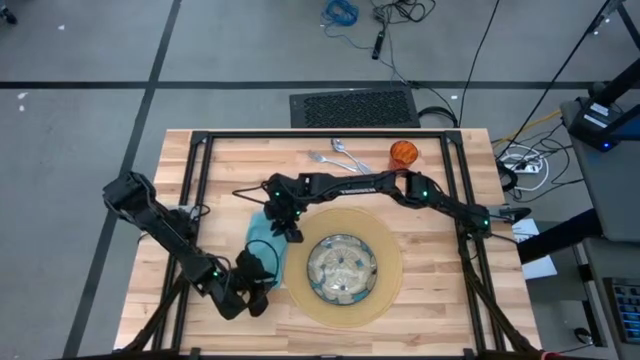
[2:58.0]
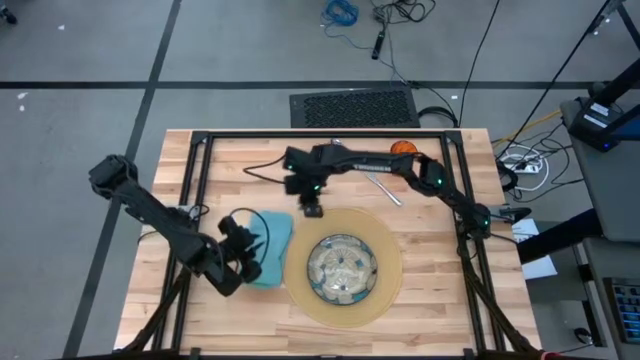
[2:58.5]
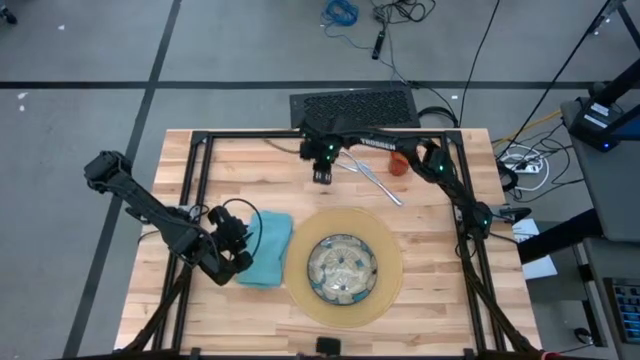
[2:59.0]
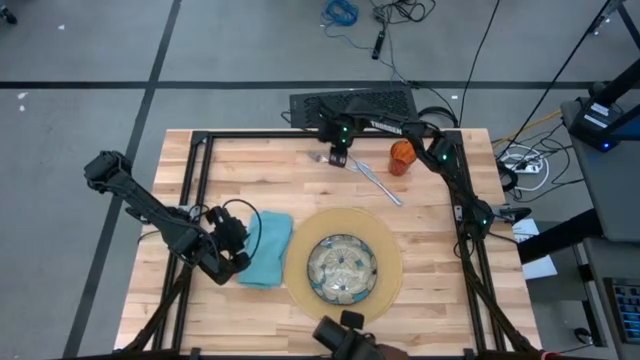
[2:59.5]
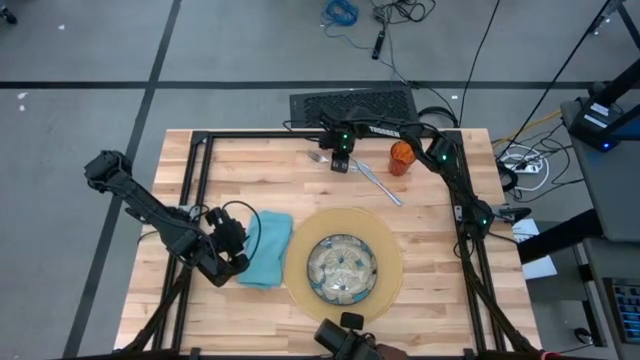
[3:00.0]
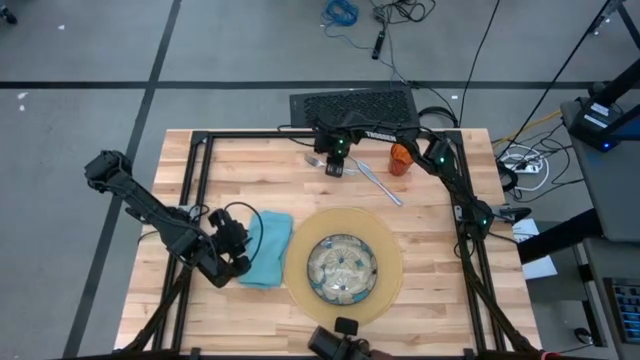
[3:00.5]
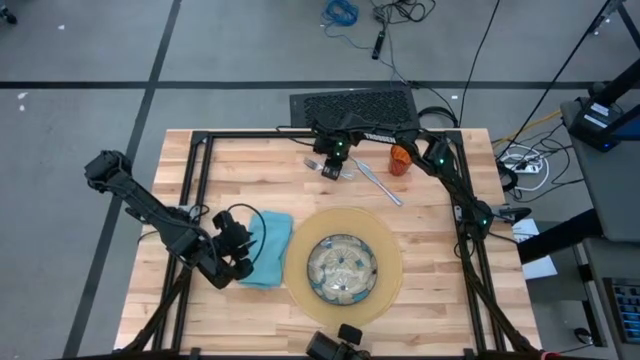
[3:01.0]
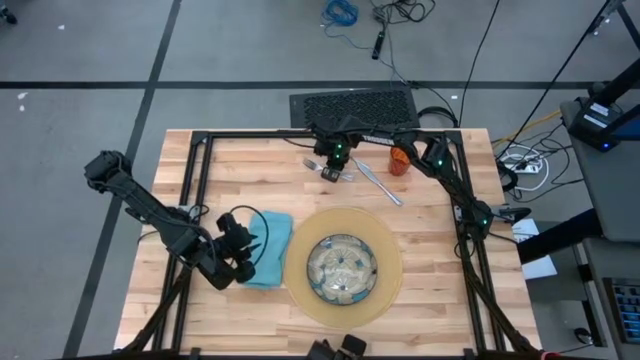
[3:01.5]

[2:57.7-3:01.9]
Task: Set table place
Put the silver fork on the blue napkin

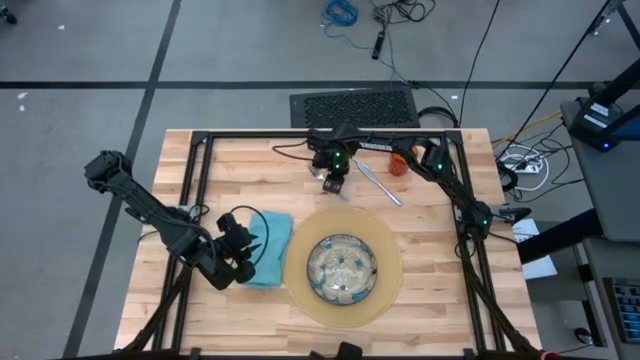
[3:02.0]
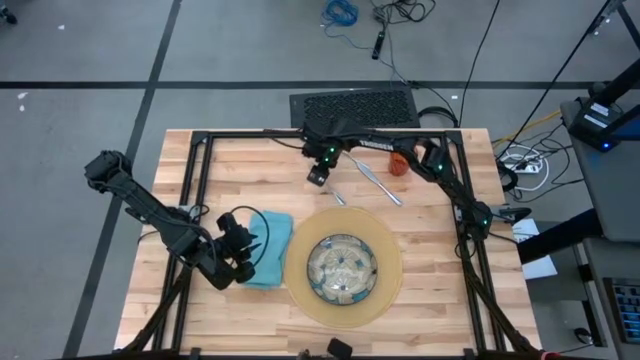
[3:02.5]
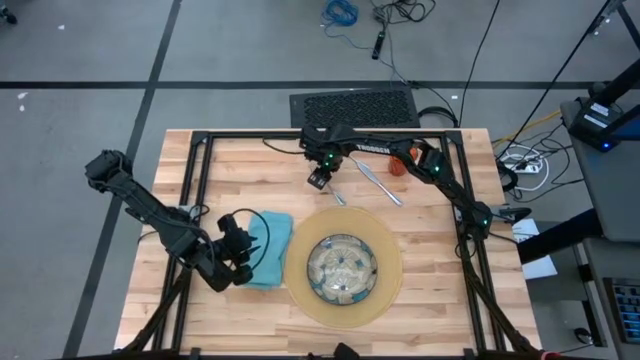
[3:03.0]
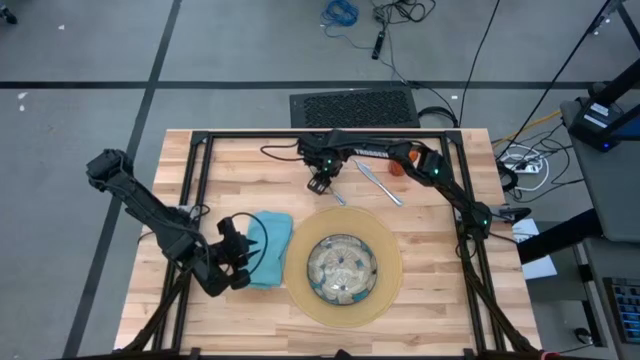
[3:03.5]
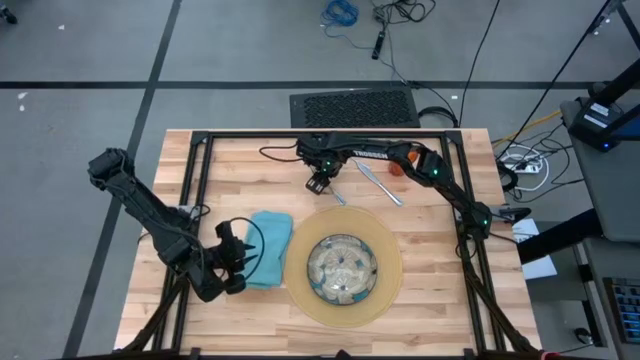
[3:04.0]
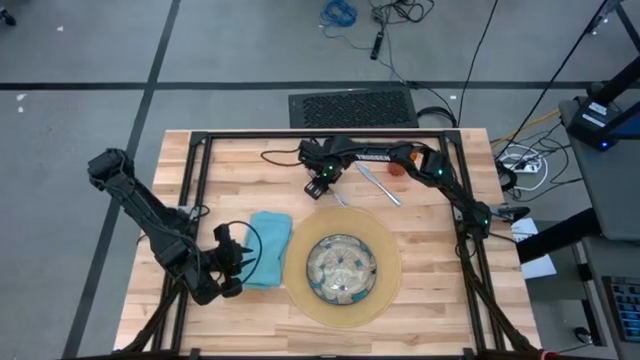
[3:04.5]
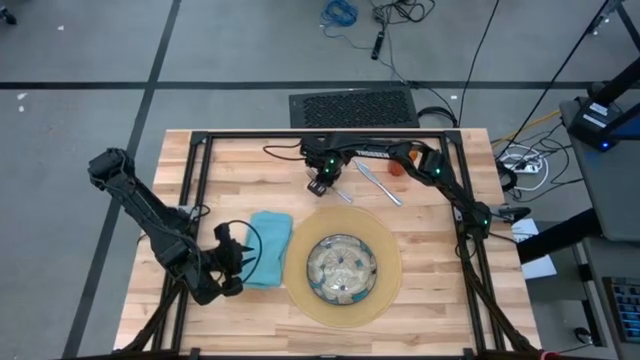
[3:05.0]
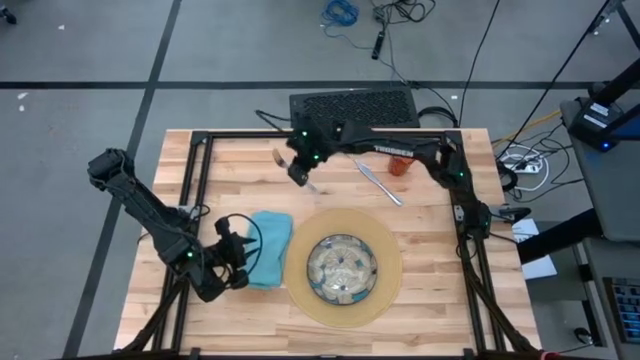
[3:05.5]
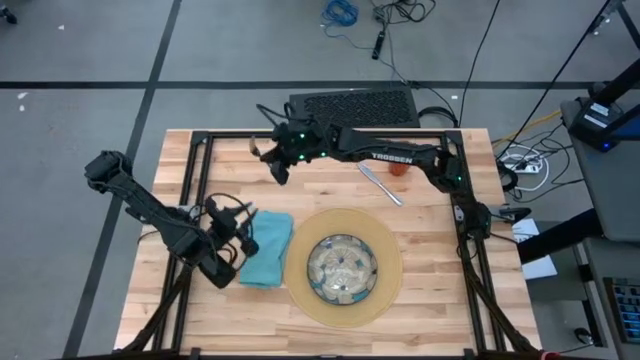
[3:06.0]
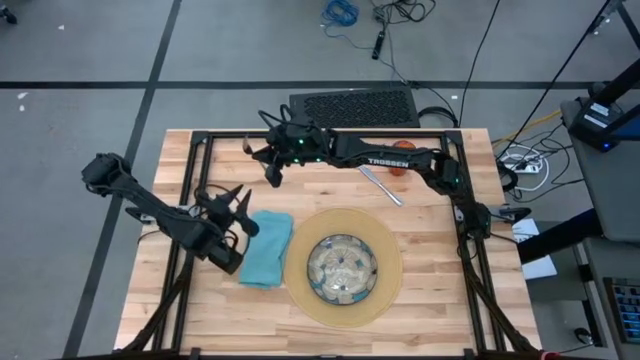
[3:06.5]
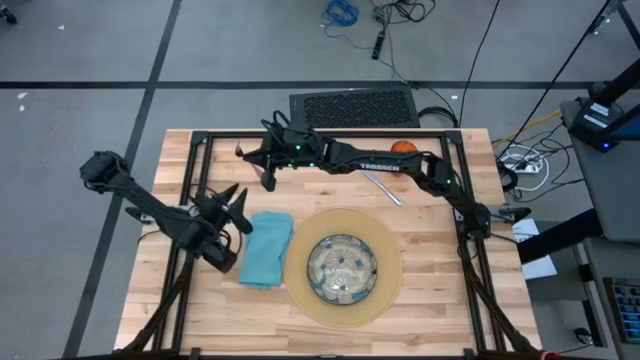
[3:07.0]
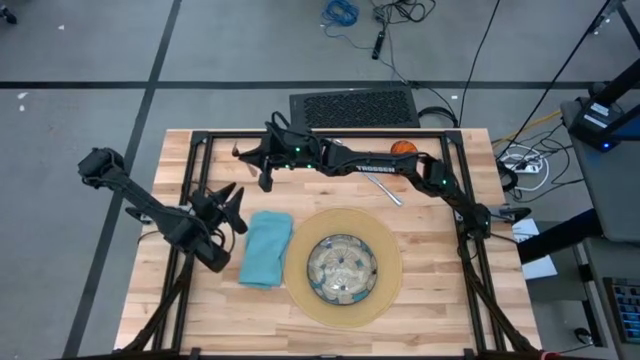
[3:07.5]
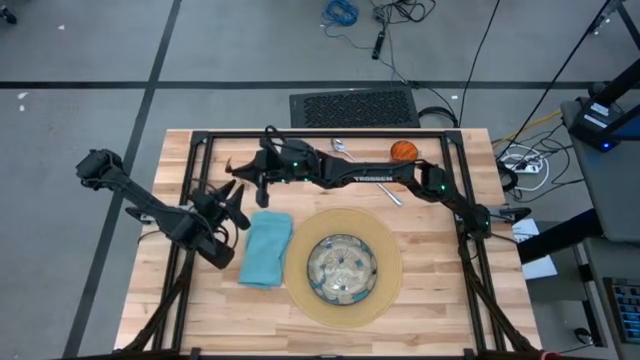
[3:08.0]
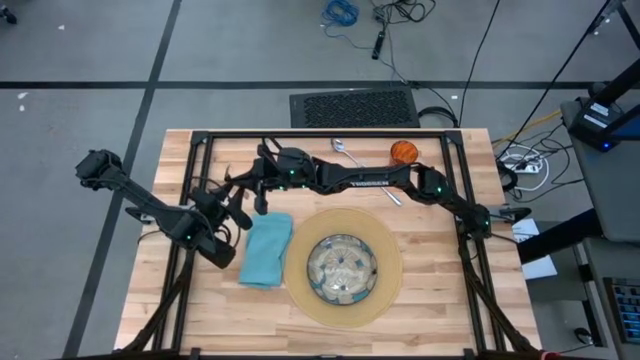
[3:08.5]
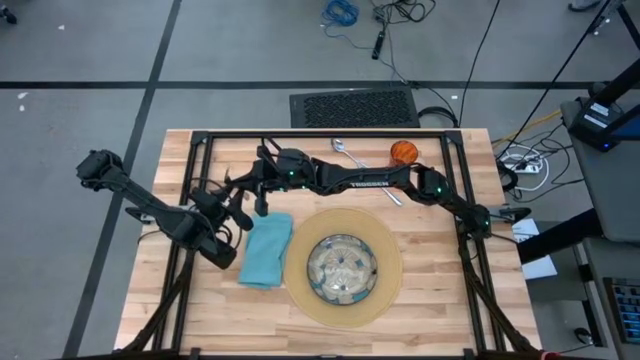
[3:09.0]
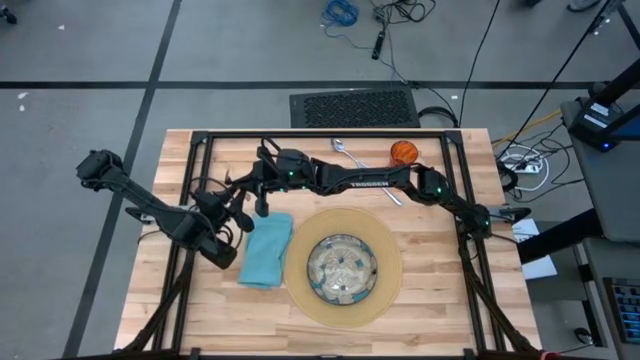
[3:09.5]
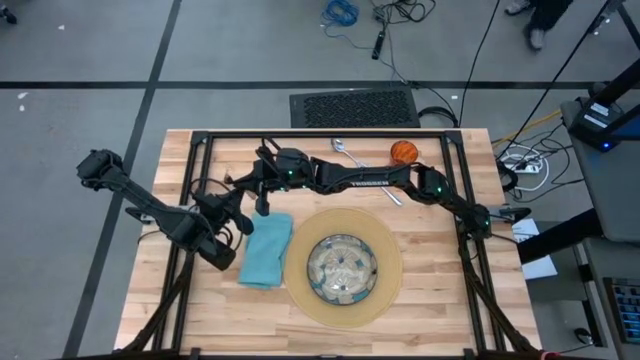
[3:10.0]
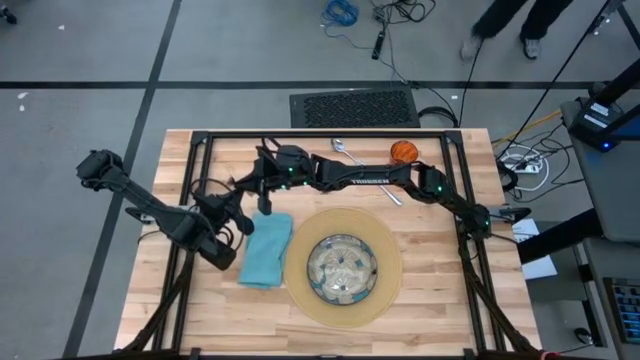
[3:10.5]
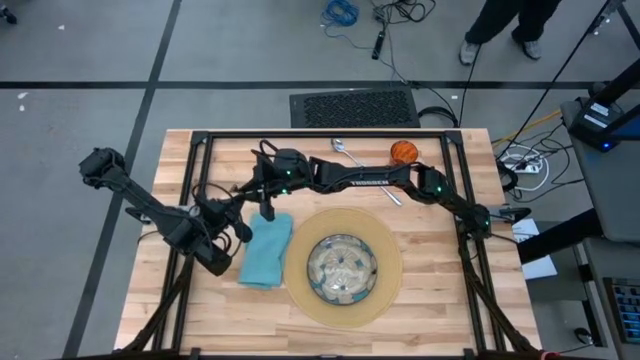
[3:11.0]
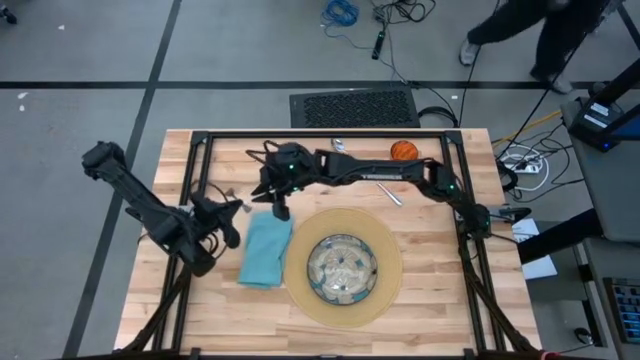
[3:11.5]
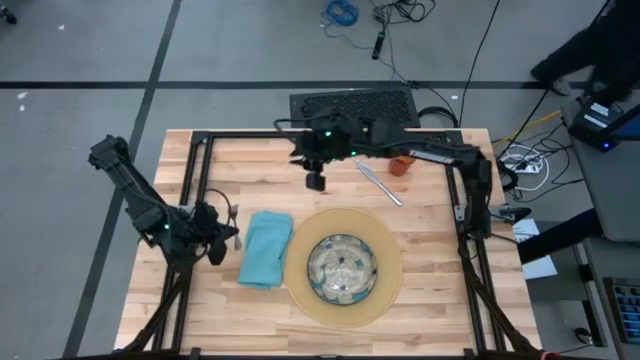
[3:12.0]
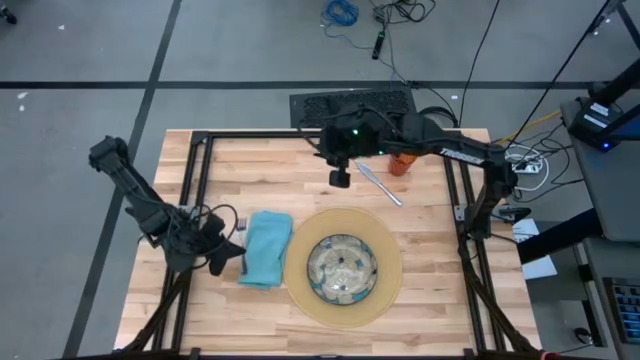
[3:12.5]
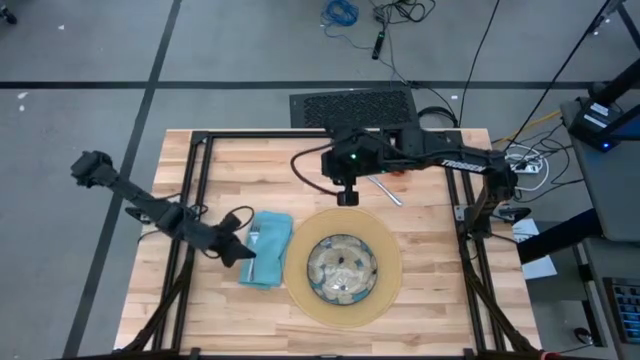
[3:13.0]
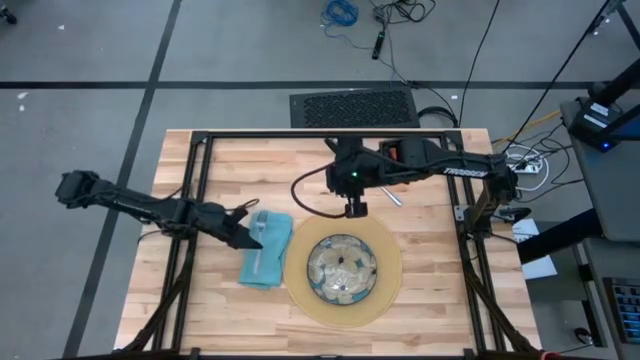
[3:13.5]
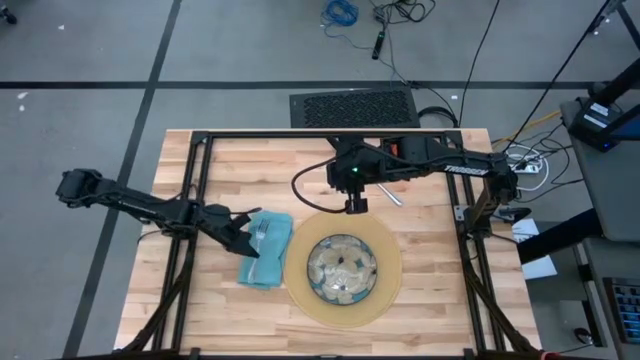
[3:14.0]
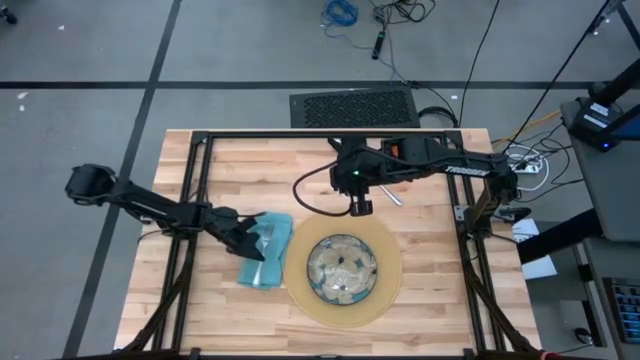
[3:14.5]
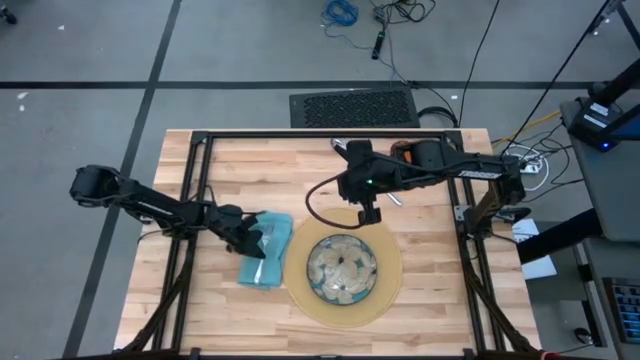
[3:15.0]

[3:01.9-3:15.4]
Put the silver fork on the blue napkin

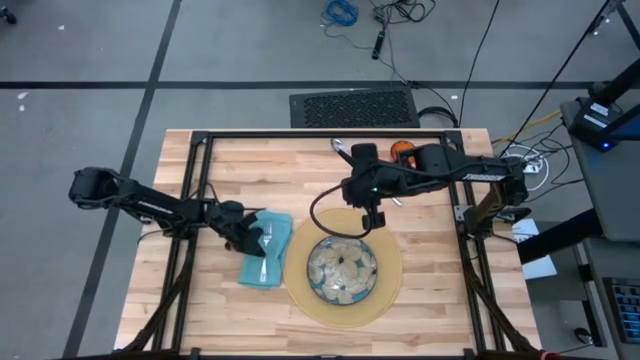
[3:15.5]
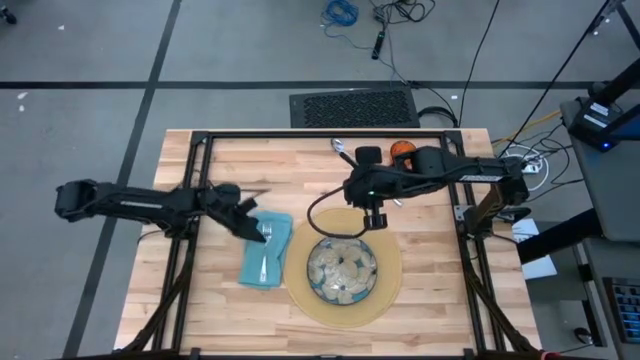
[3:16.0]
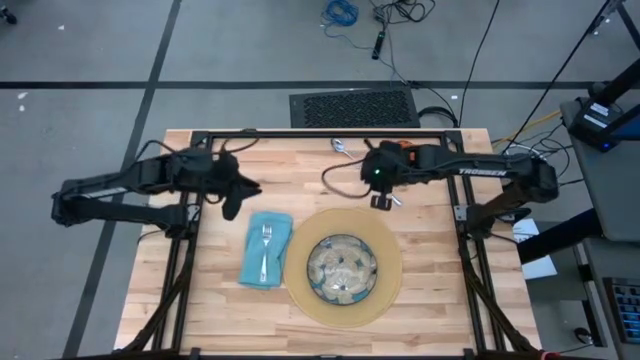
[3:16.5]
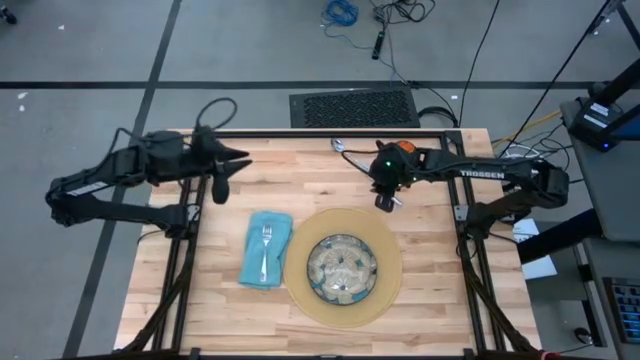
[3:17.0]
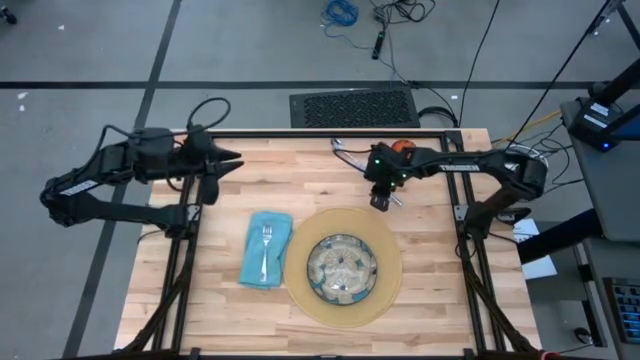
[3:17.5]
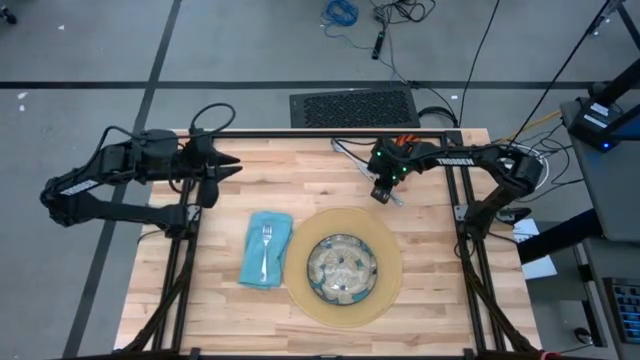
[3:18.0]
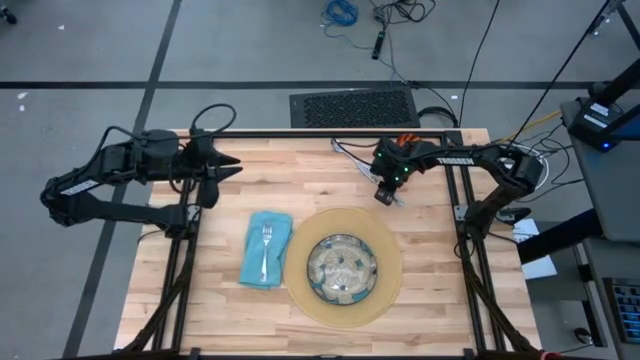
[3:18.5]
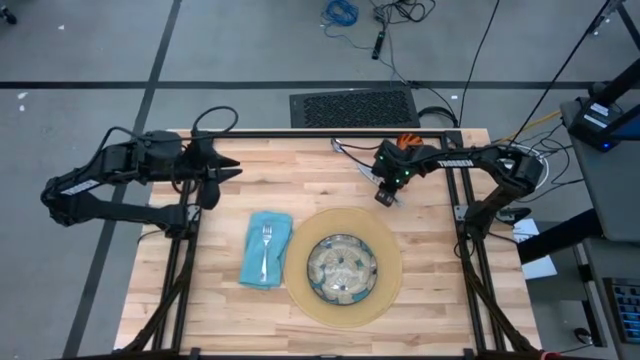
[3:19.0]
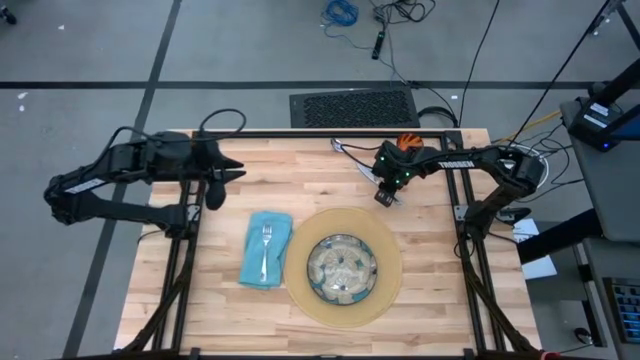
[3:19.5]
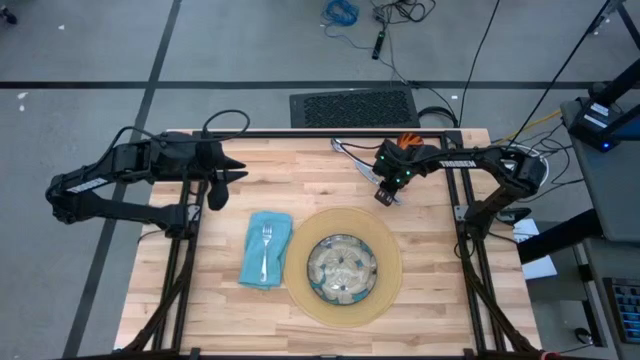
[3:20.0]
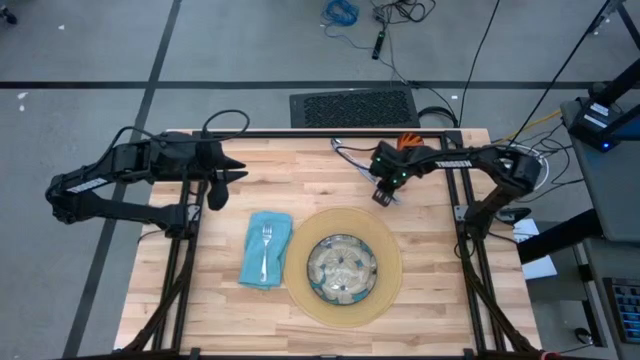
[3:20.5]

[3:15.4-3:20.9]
Put the silver knife to the right of the brown mat
